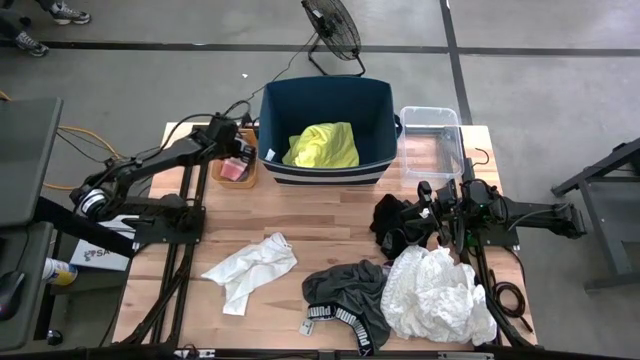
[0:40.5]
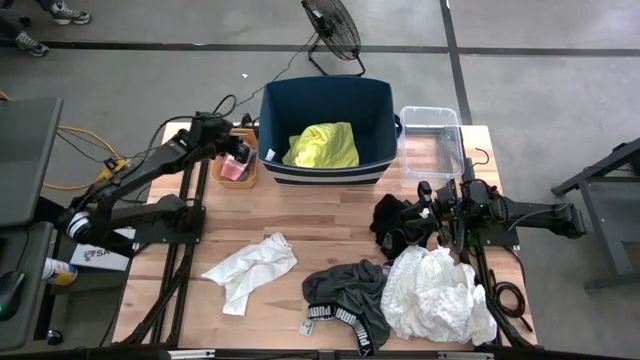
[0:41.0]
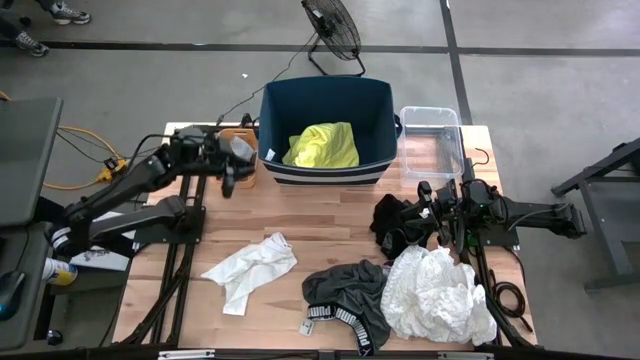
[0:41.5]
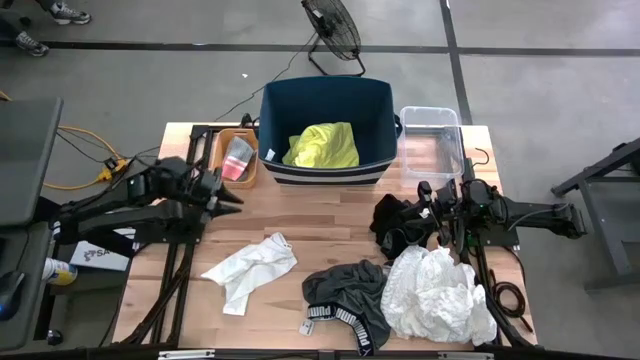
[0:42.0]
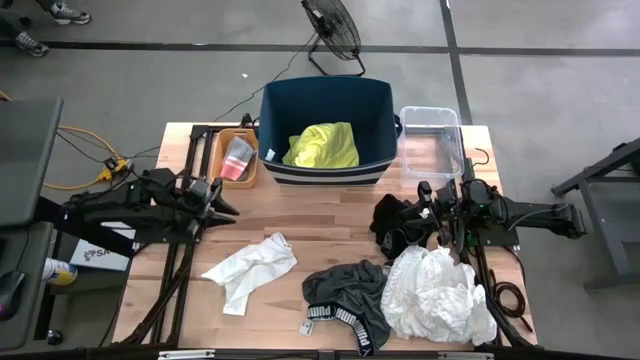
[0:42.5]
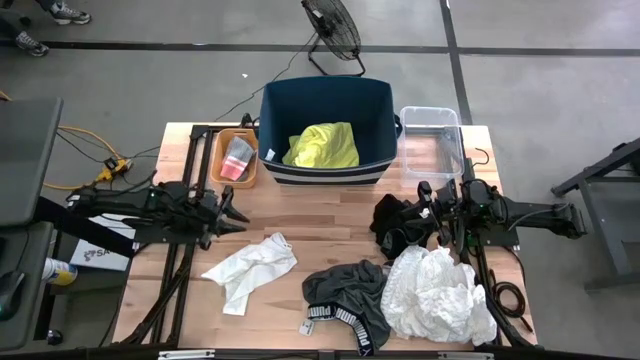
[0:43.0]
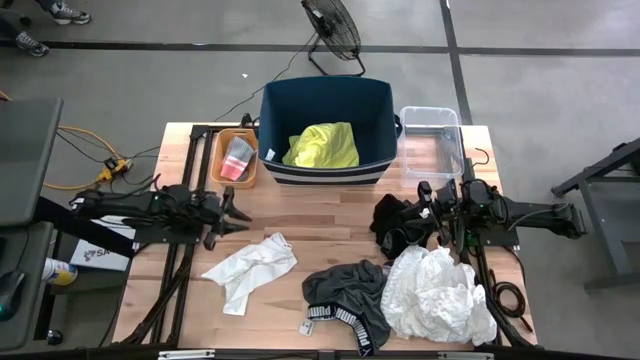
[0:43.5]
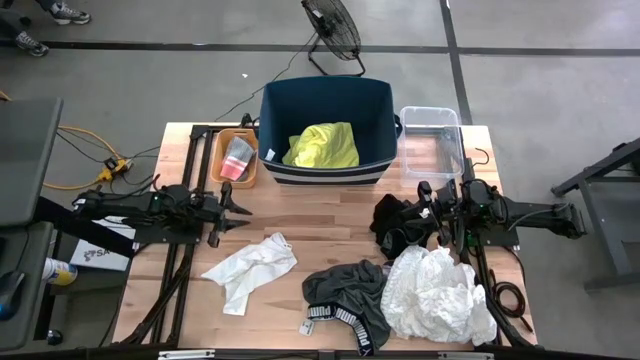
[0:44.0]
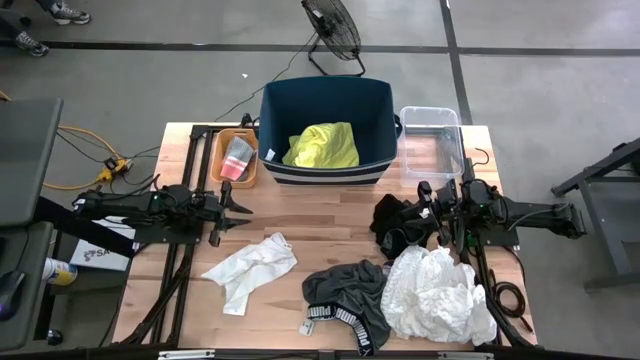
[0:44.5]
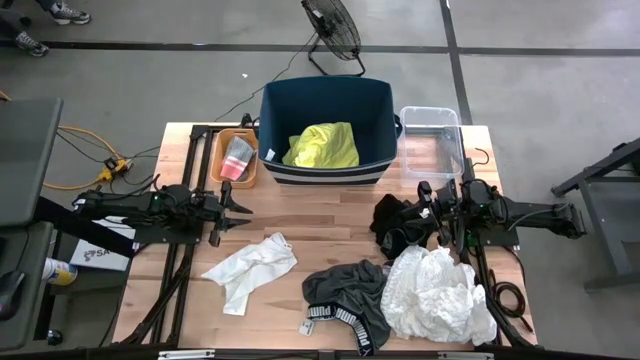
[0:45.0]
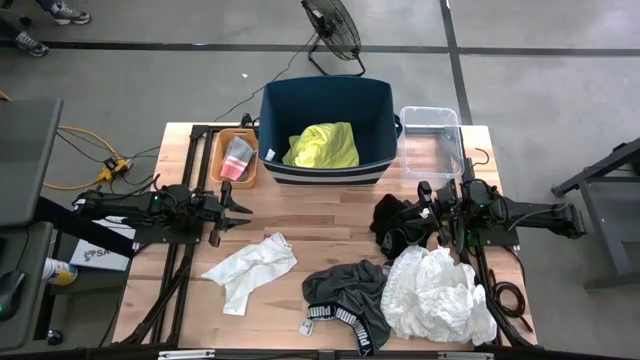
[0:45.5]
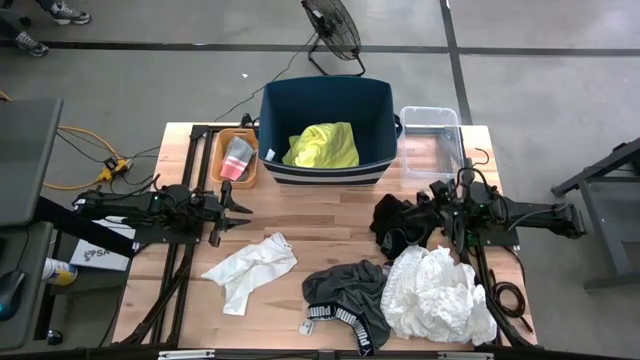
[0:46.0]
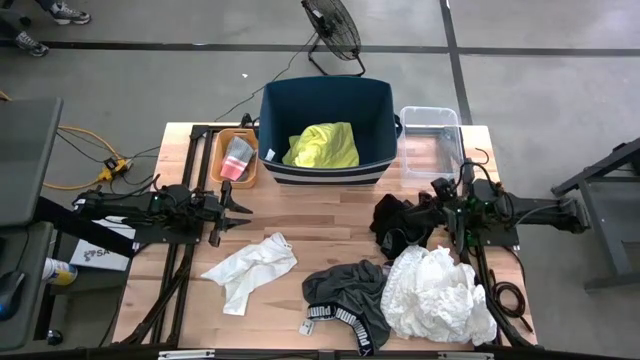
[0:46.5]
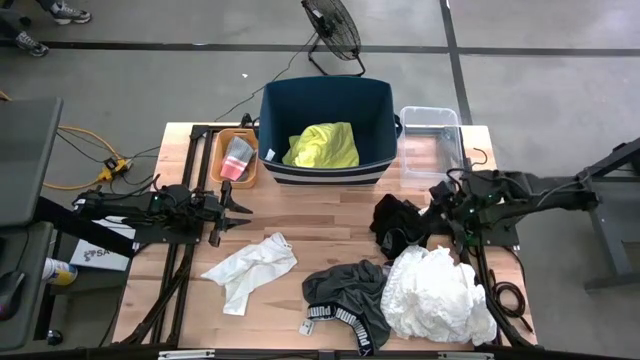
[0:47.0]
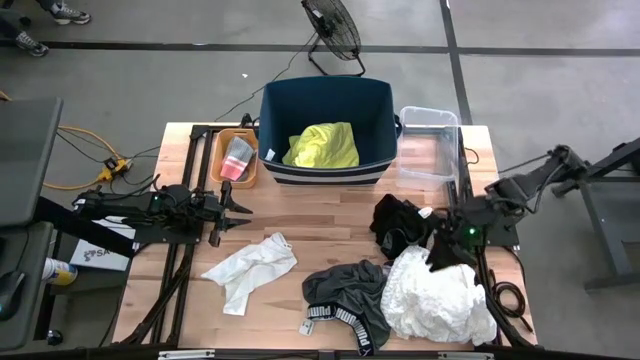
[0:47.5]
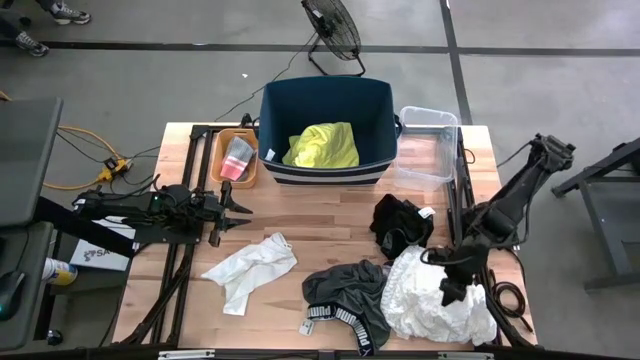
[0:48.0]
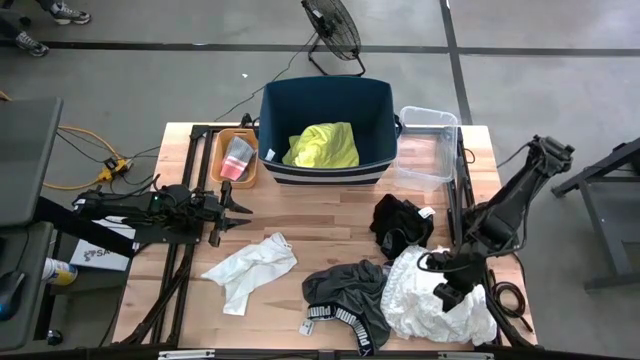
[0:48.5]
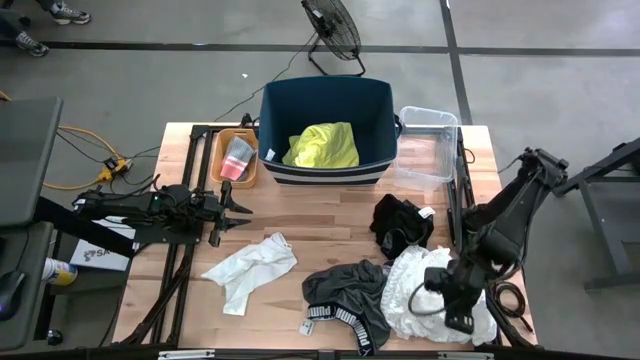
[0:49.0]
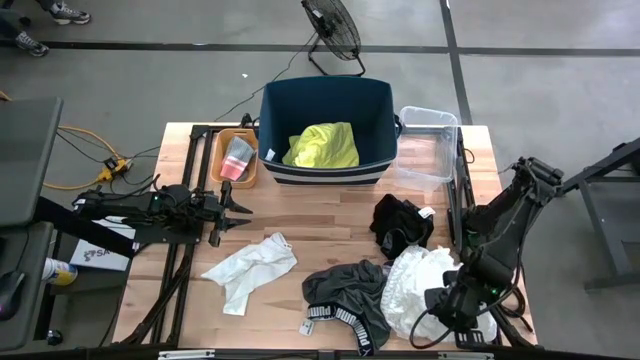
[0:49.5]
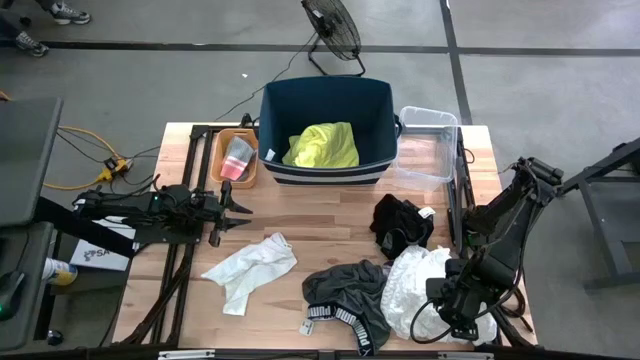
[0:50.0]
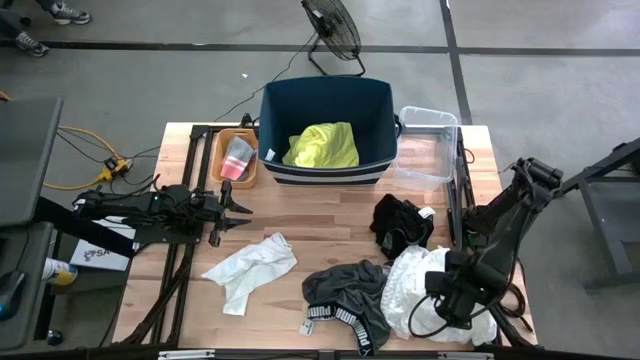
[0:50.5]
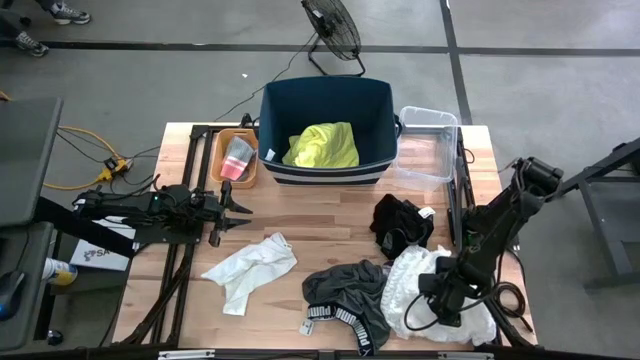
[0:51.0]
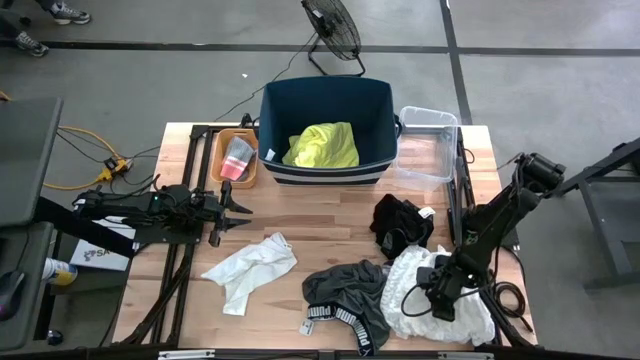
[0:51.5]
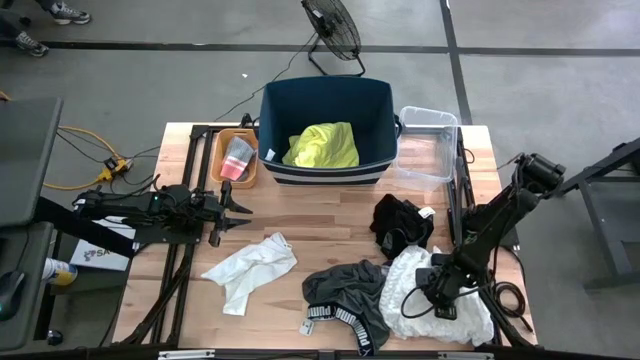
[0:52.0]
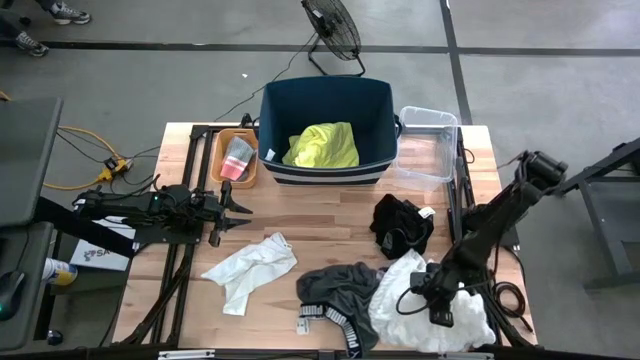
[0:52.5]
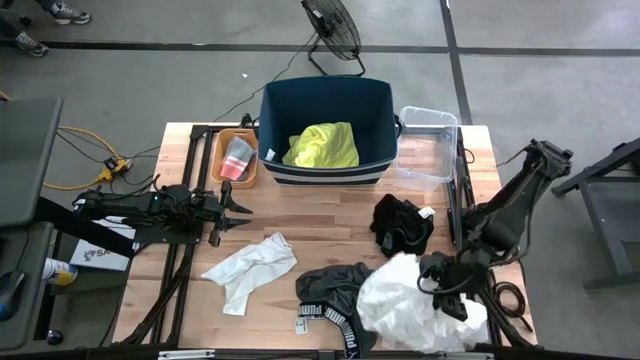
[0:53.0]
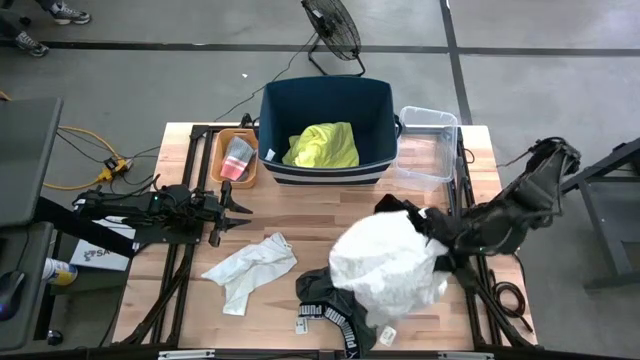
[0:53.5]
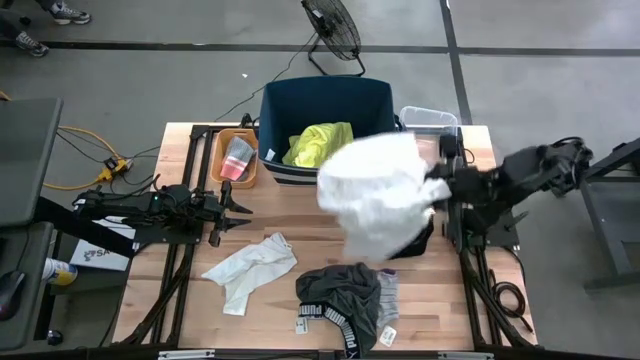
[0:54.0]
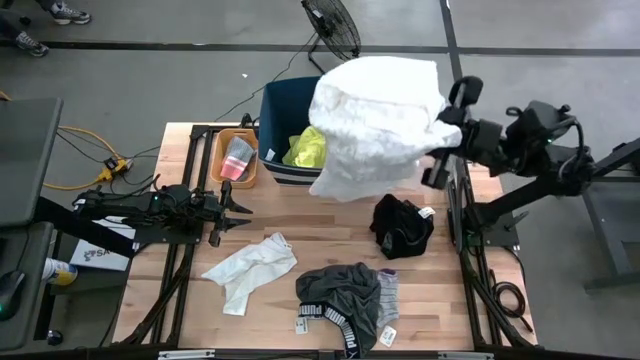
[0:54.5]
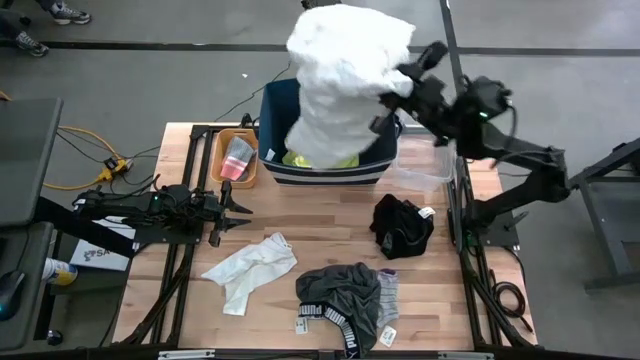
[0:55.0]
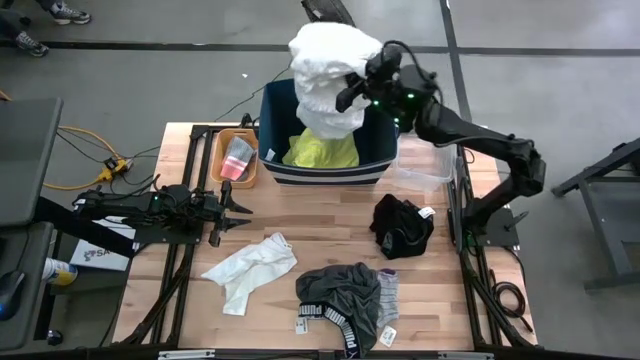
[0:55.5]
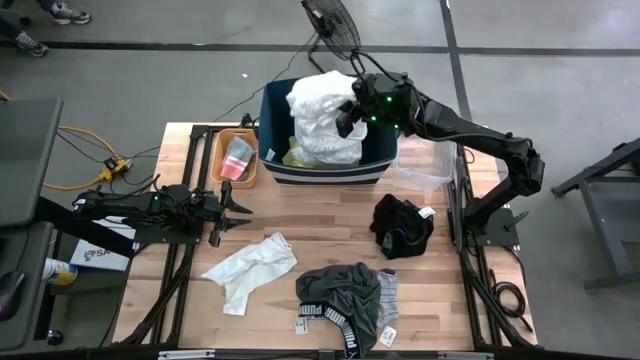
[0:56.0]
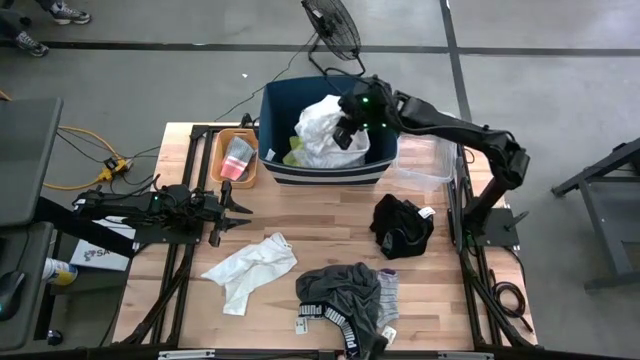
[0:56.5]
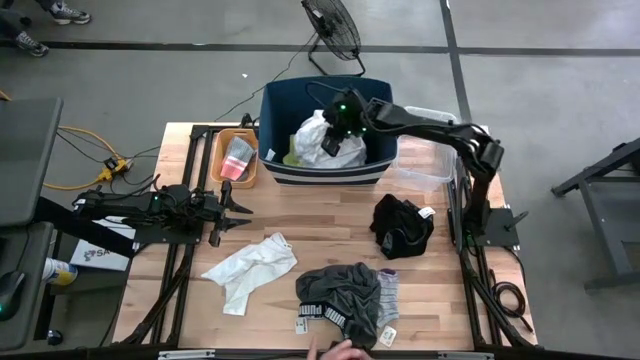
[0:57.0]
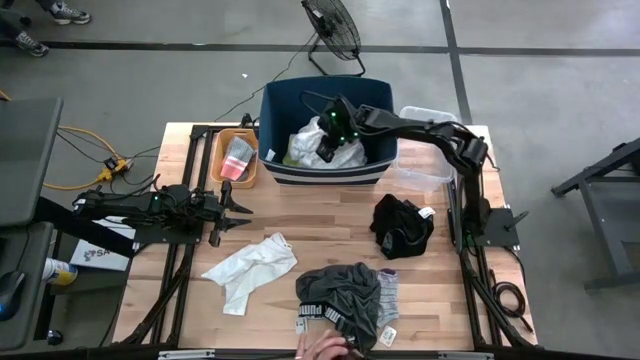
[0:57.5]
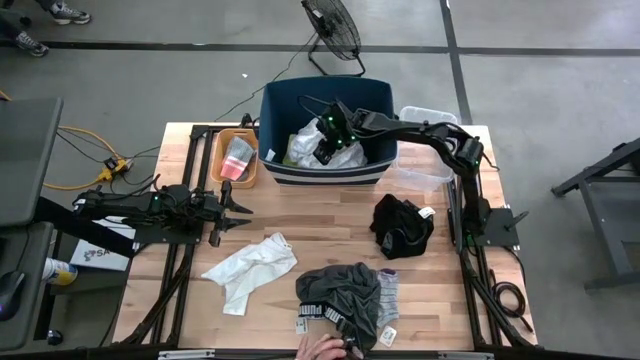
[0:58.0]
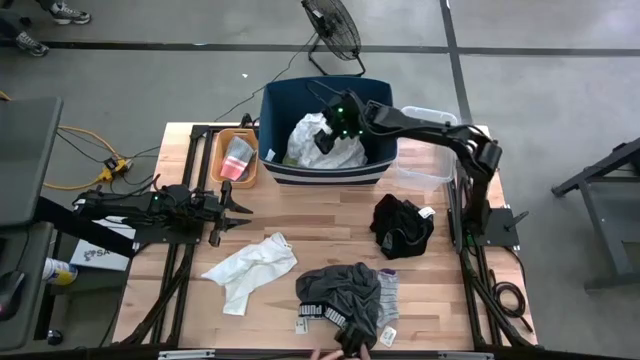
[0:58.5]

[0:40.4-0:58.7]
Task: Pick & Place Cloths
Put the white dress into the laundry organizer
